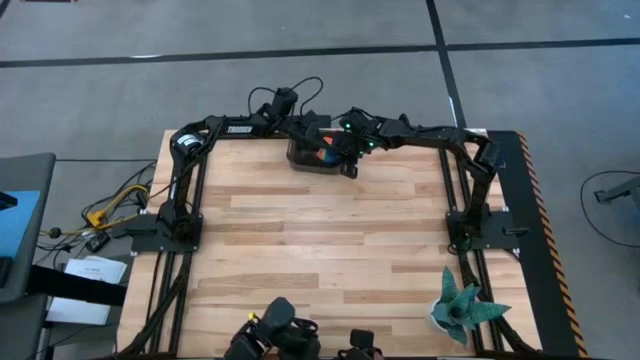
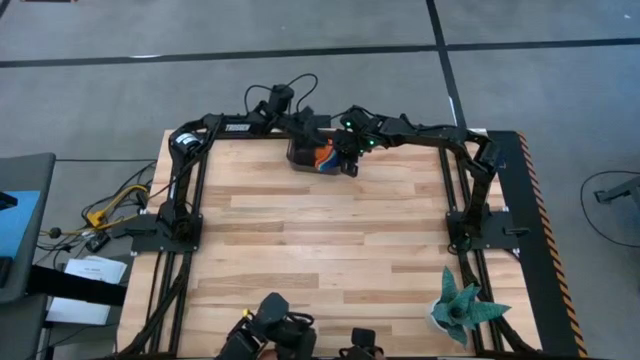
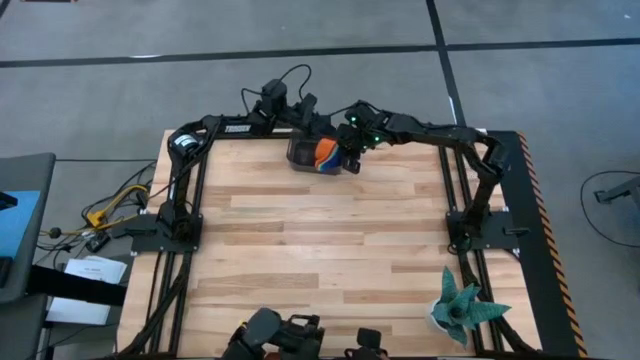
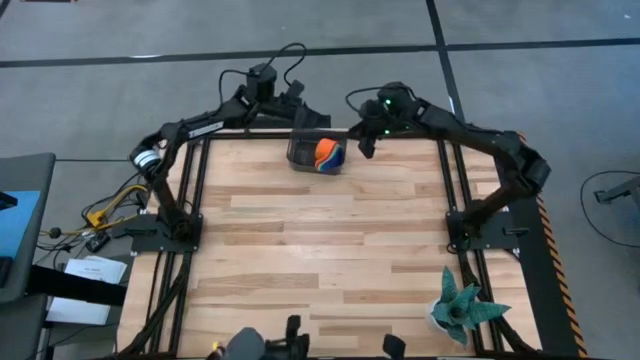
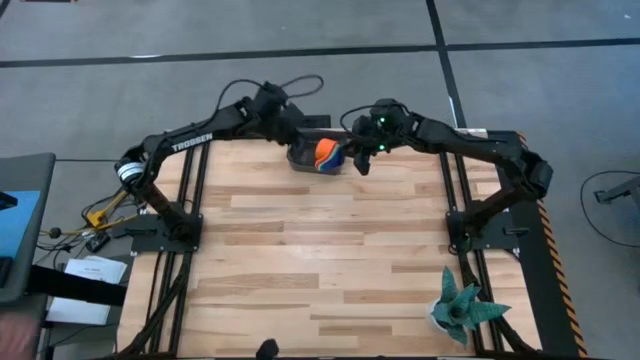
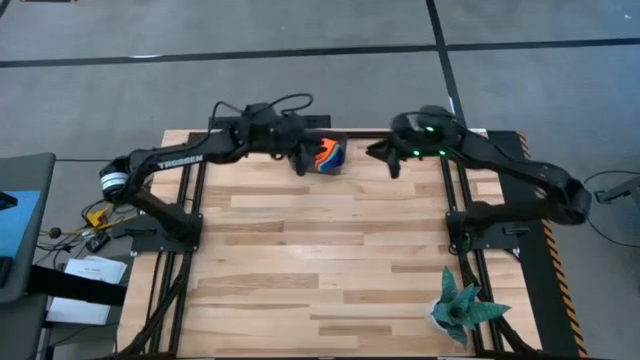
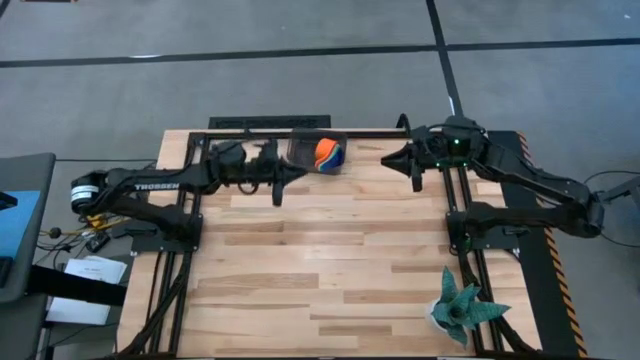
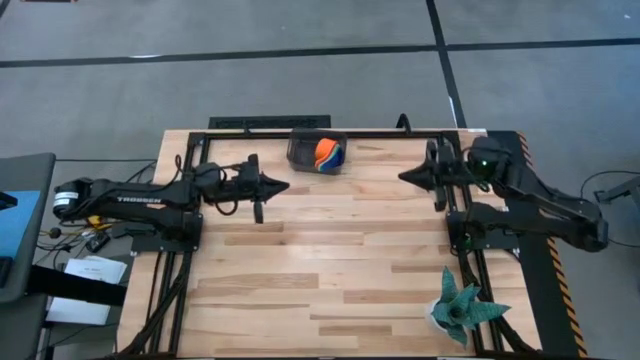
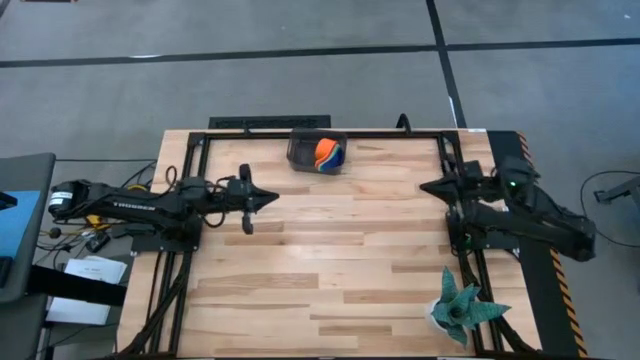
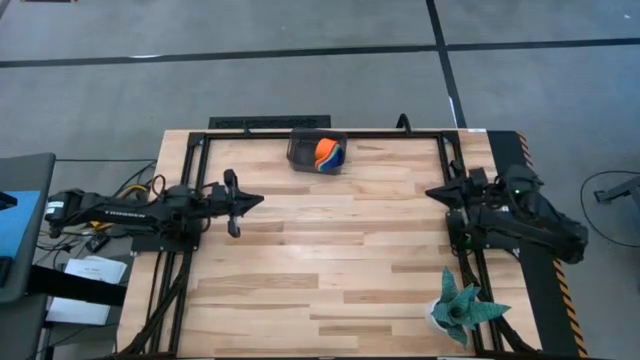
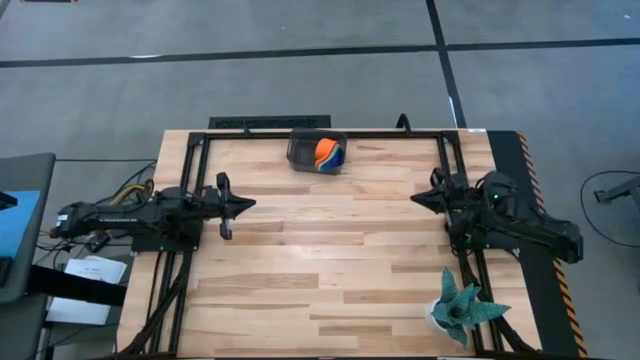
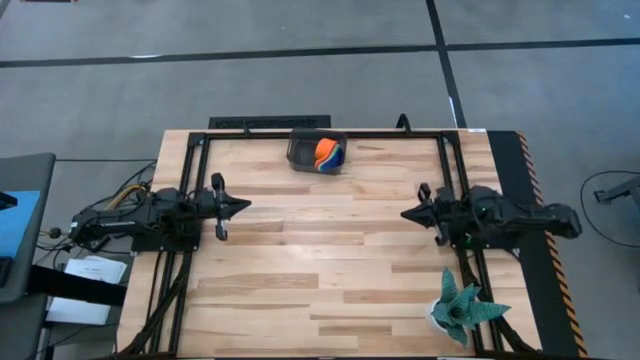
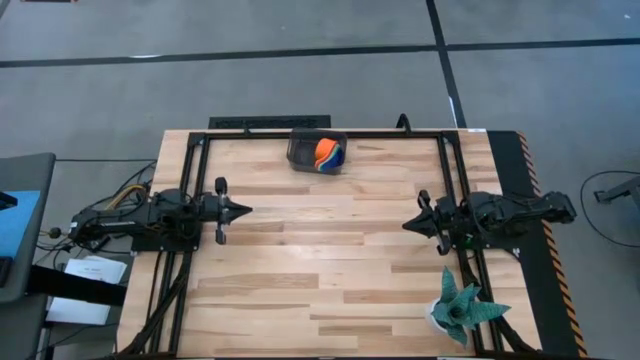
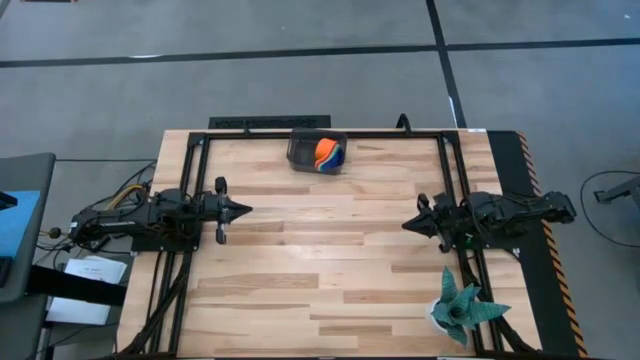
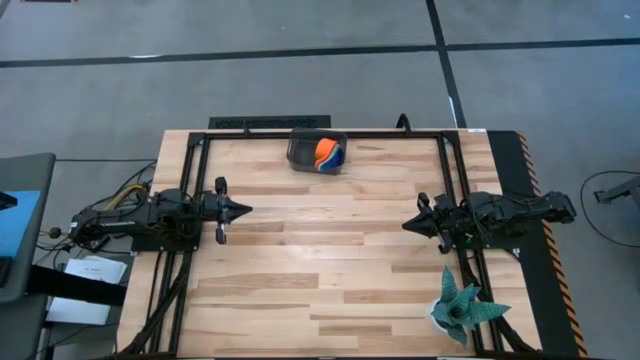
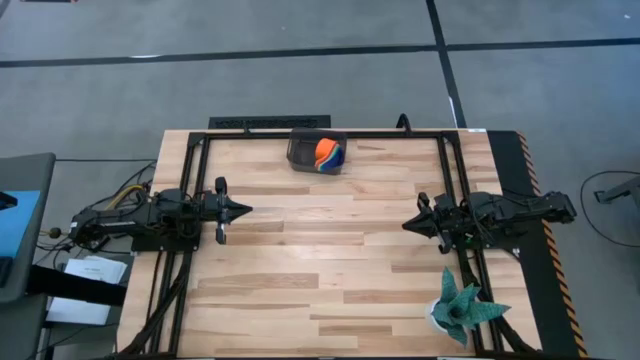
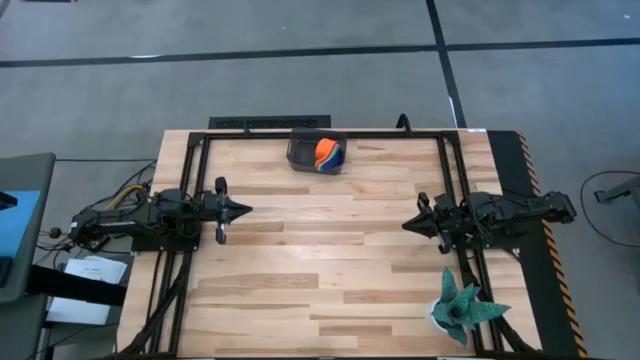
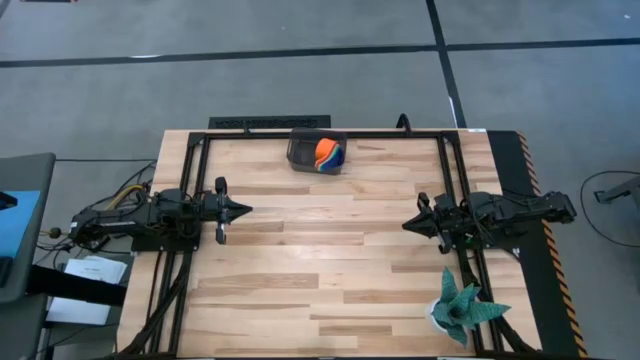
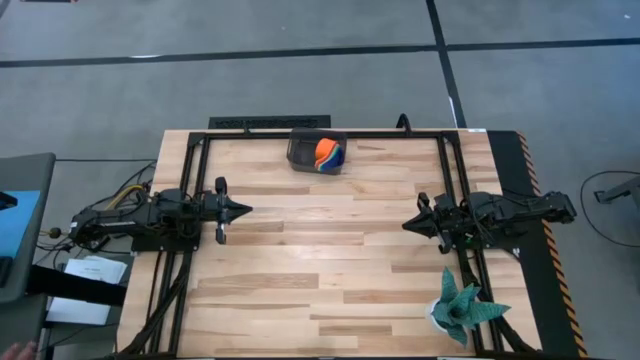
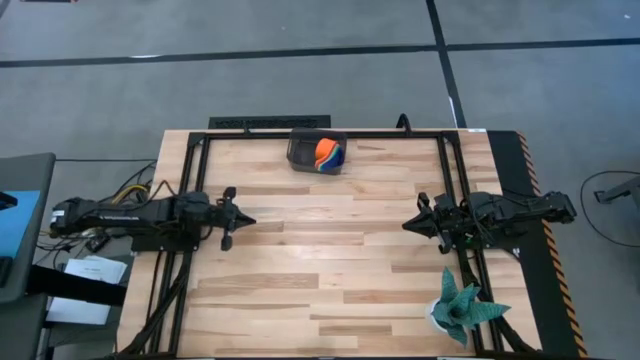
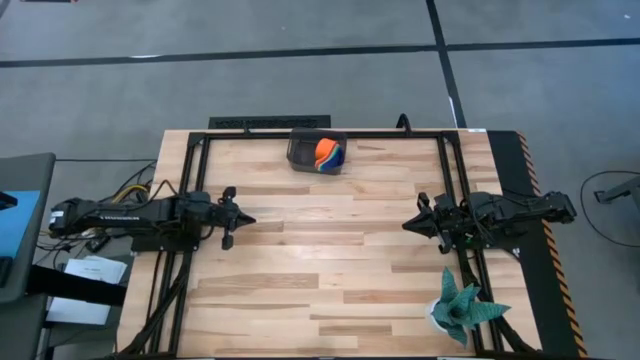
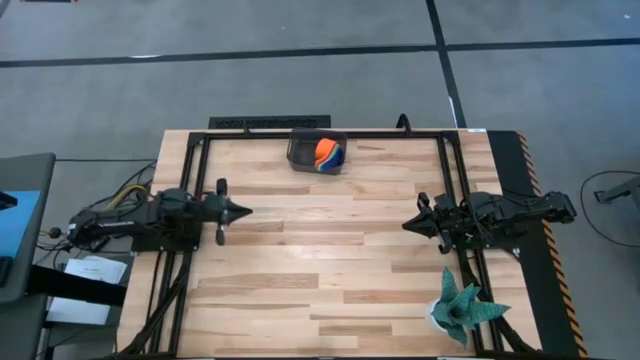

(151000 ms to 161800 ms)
Task: Nest measuring cups in basket
Return to Home Position
